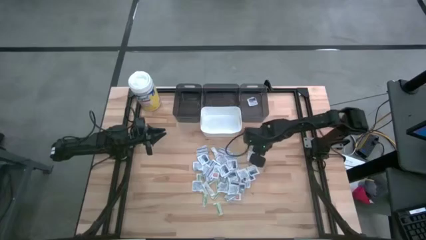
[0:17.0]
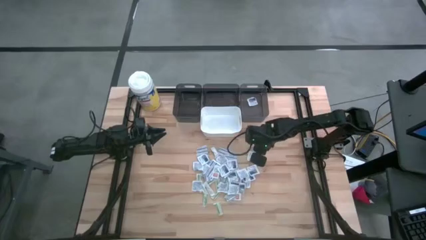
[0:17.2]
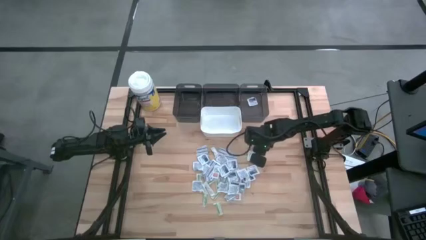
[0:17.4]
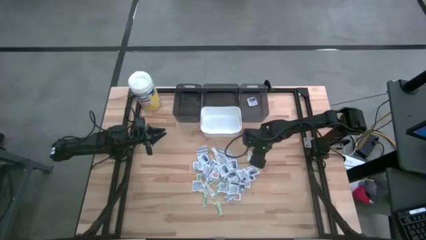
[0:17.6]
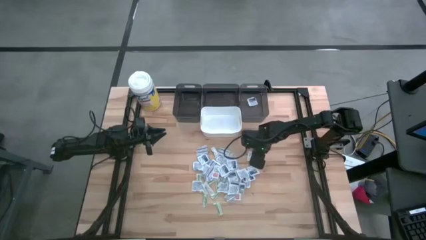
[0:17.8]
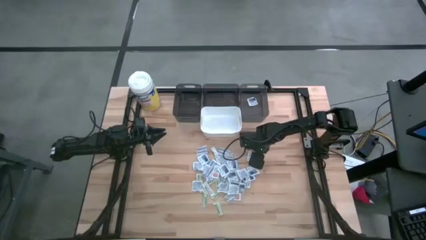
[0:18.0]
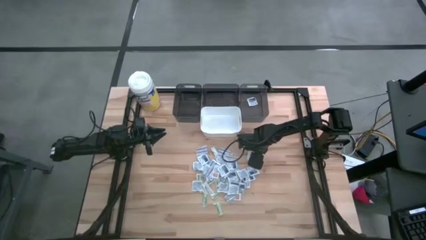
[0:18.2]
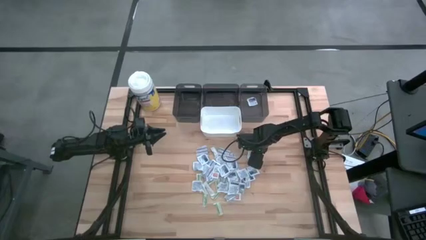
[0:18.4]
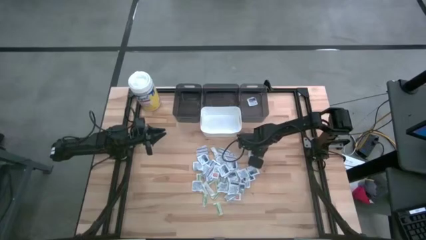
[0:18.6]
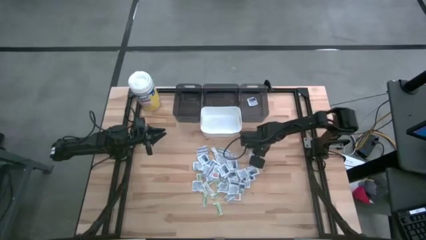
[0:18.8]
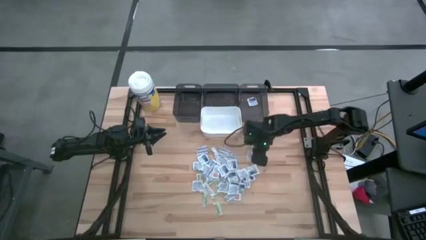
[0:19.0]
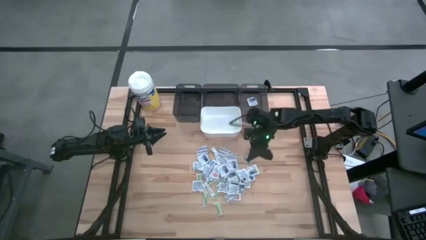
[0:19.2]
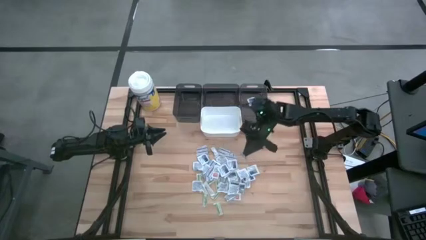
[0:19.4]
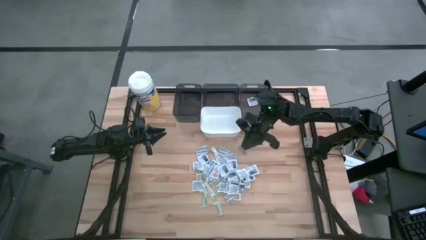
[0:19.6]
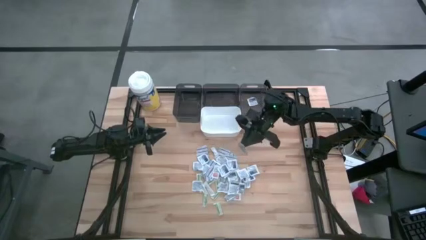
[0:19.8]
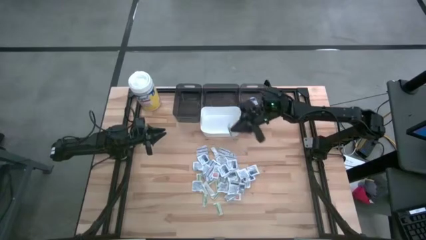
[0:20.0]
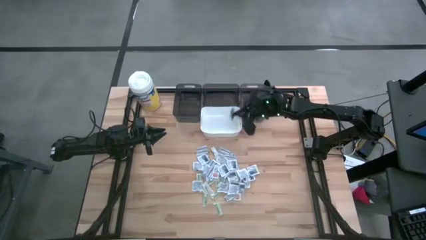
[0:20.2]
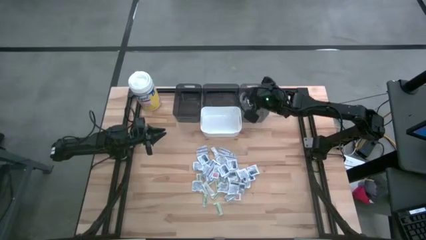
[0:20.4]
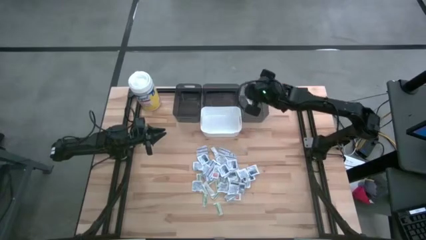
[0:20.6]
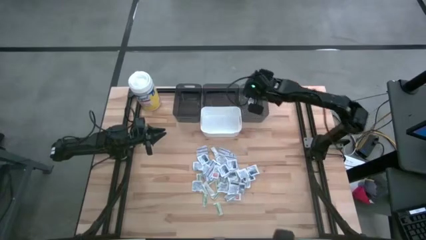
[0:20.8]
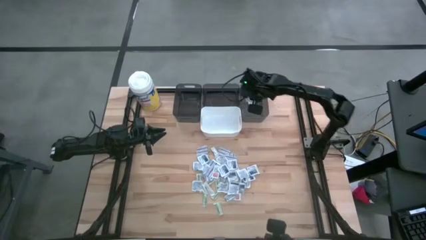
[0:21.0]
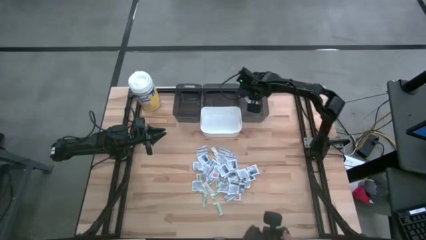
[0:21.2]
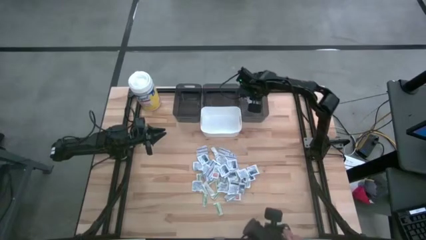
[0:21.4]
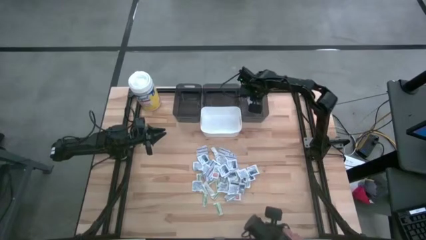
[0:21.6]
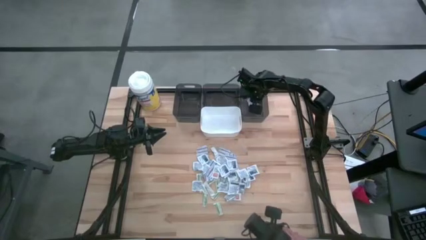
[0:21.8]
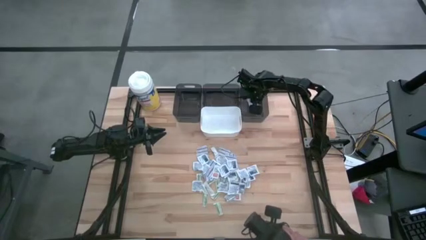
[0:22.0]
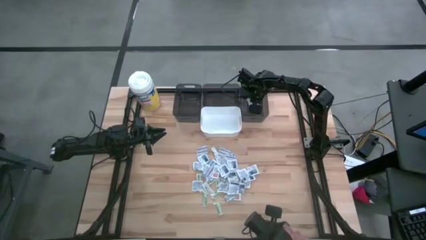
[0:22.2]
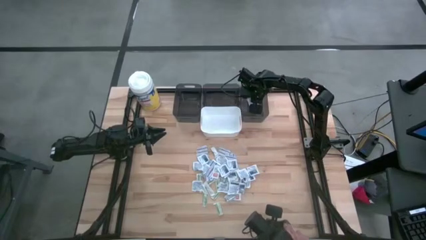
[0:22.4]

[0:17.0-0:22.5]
Task: Pick & Place First Aid Supplies
Put the blue alcohol pad into the right black bin

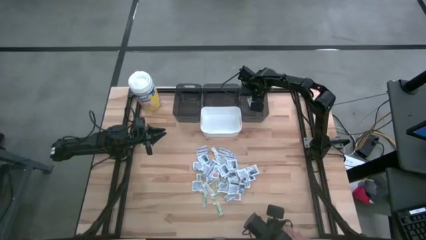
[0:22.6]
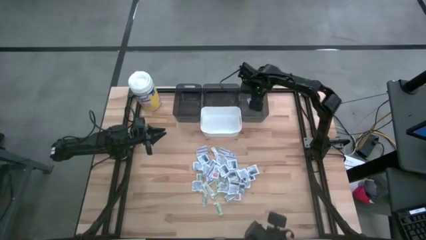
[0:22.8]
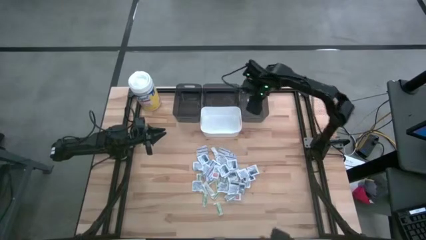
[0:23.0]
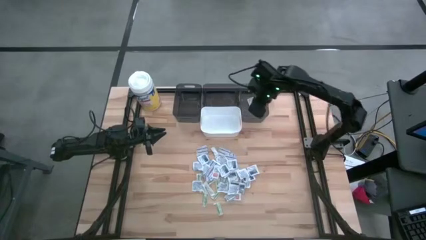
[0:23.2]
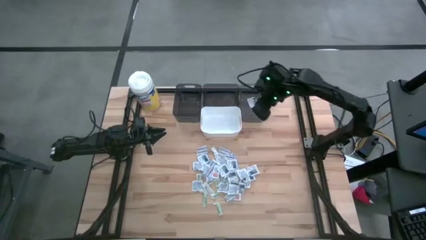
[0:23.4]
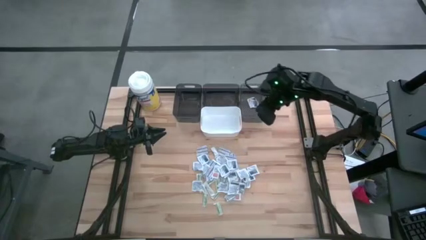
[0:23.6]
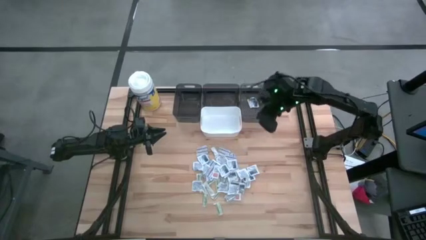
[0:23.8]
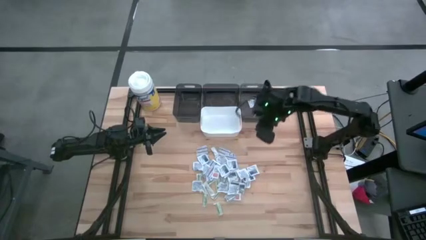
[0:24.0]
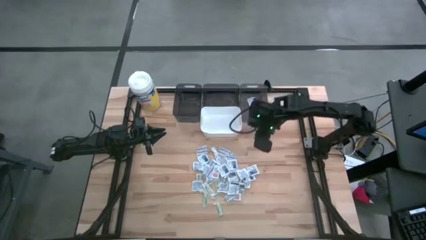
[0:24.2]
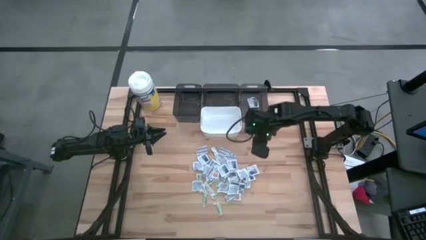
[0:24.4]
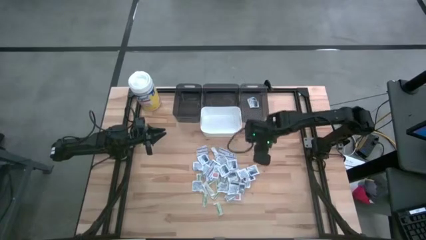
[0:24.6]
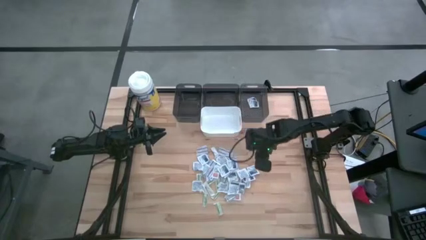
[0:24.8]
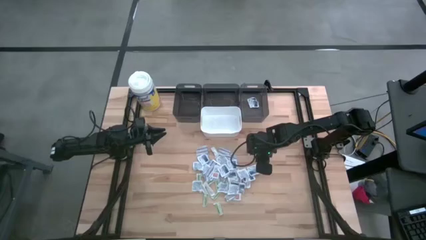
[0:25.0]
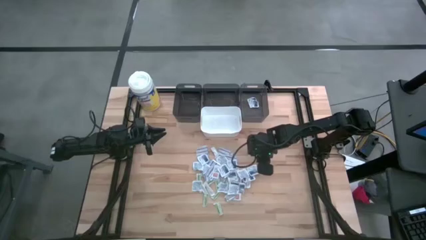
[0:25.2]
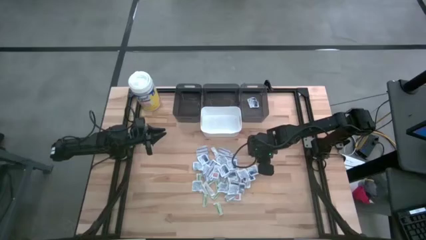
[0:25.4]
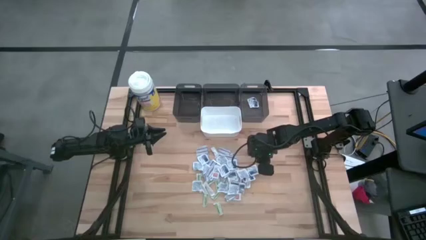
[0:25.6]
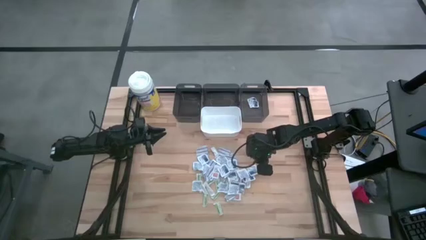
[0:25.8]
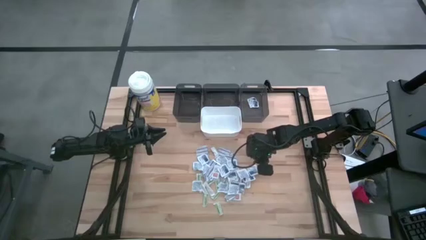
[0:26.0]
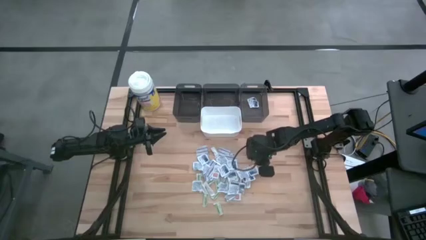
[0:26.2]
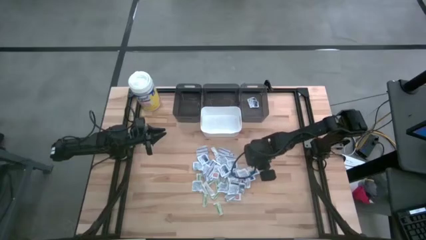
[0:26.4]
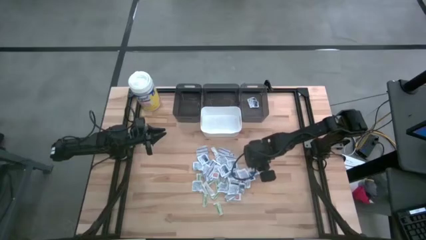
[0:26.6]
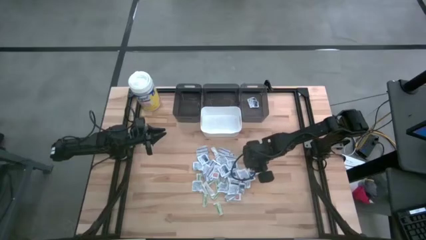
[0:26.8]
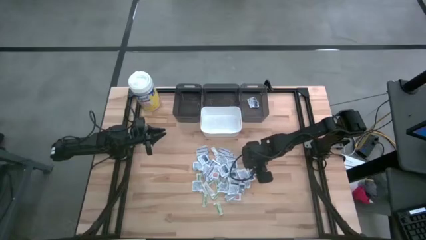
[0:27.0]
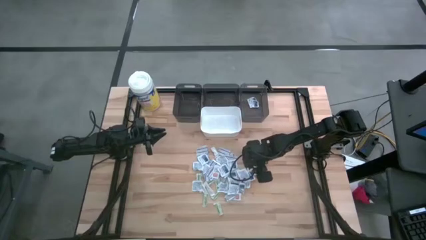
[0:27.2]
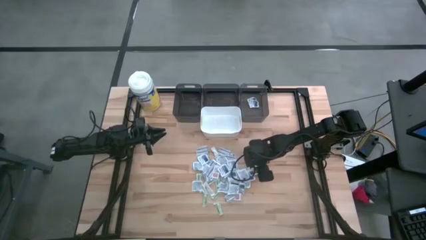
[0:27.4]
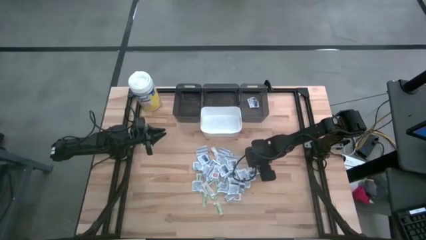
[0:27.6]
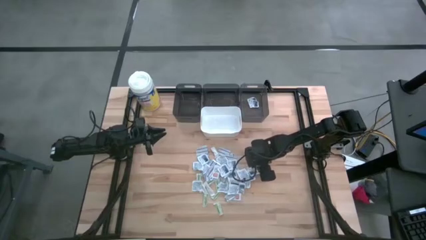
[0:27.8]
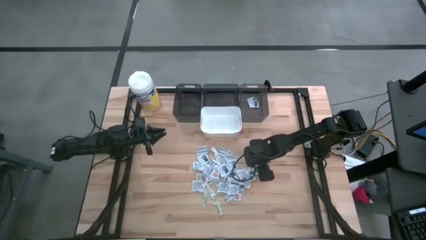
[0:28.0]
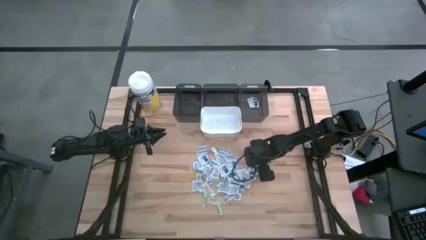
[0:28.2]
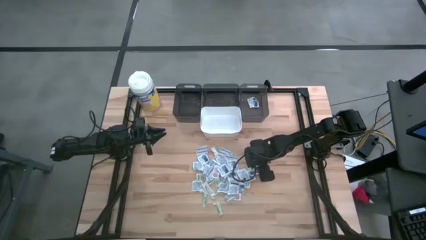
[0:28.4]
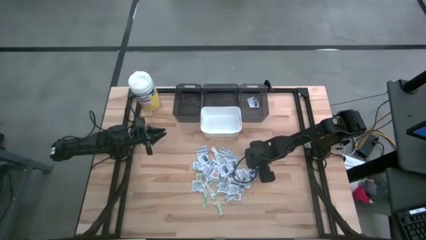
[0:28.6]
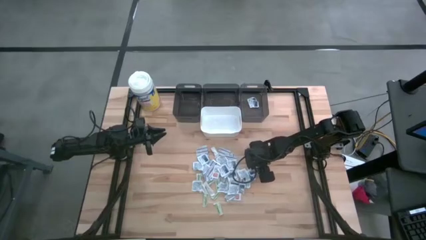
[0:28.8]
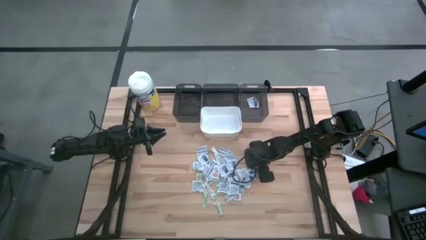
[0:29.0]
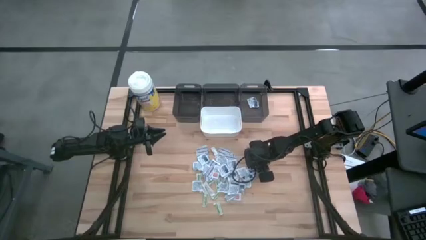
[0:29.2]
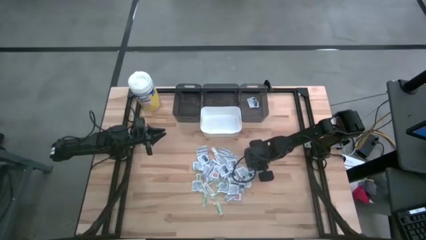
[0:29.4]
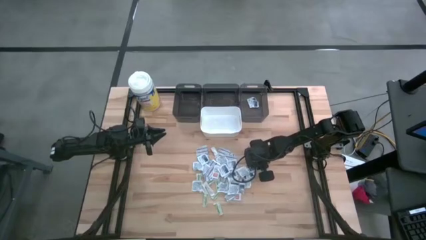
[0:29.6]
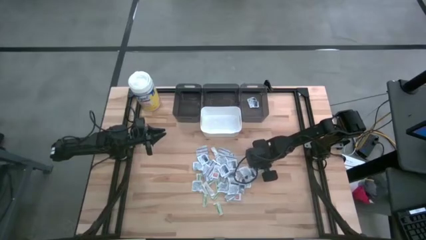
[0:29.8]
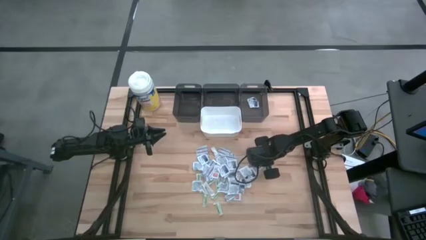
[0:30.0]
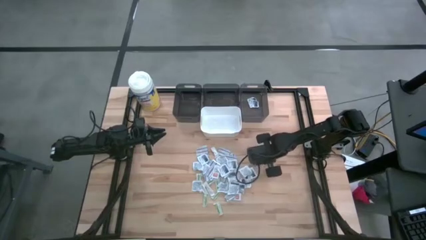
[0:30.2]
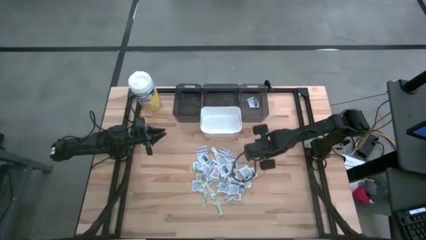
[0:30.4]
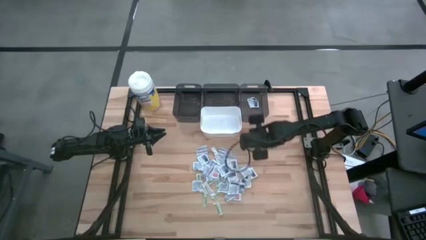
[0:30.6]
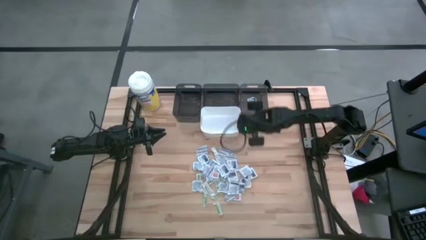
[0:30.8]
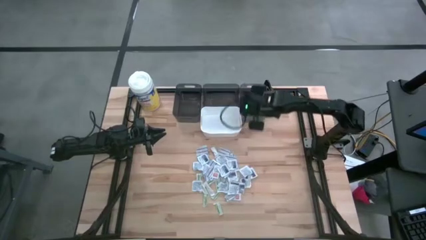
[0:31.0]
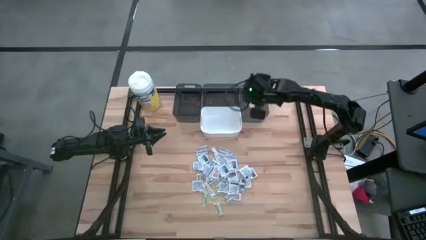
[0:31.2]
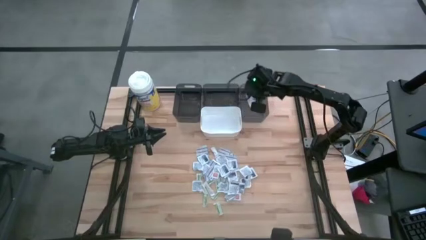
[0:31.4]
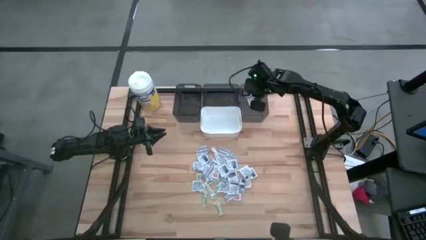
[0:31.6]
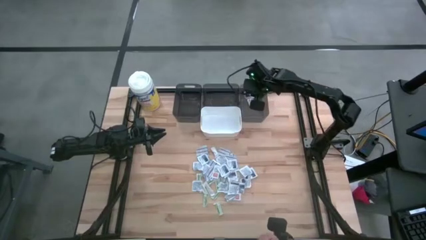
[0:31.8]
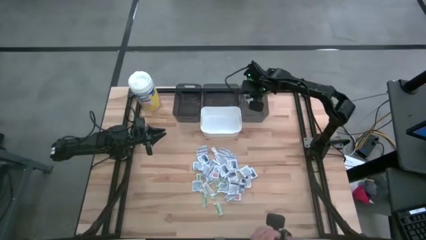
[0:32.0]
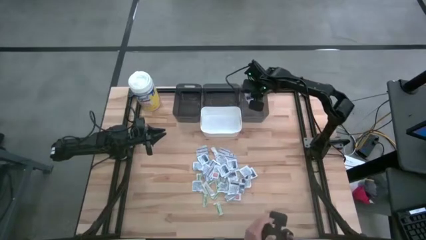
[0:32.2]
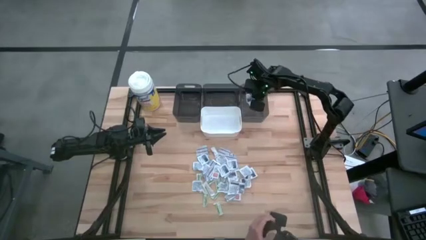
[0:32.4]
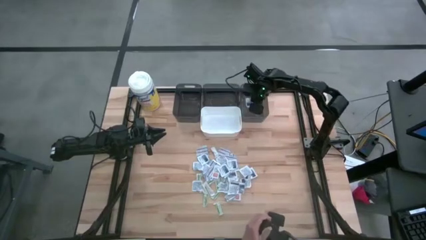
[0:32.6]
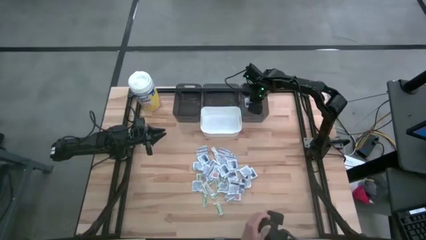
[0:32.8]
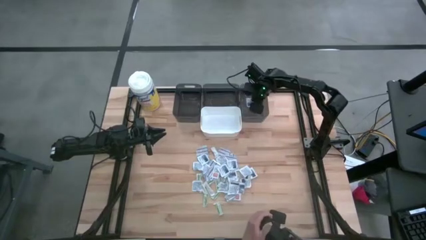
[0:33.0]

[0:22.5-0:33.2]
Put the blue alcohol pad into the right black bin
